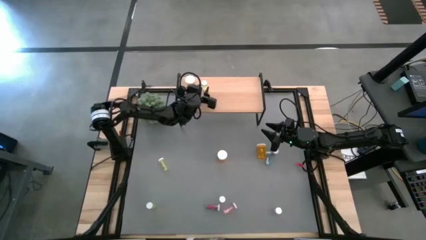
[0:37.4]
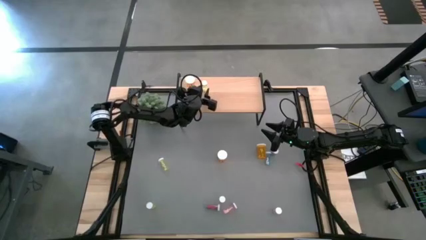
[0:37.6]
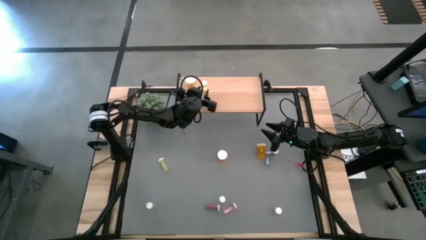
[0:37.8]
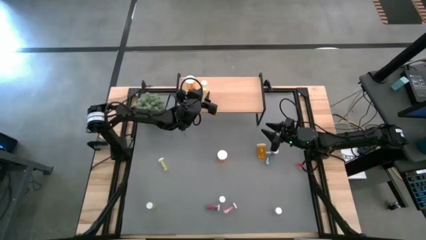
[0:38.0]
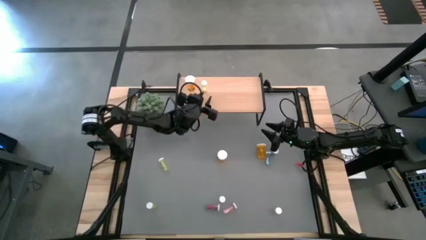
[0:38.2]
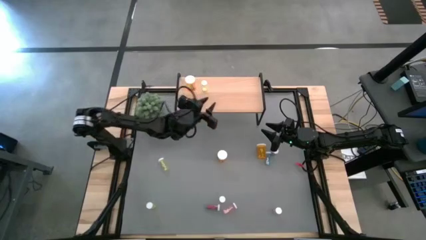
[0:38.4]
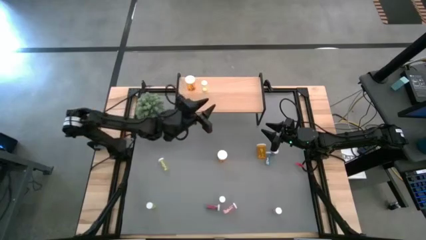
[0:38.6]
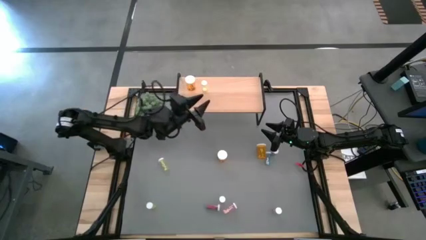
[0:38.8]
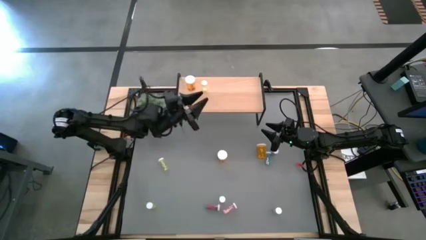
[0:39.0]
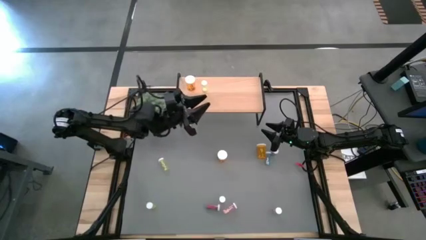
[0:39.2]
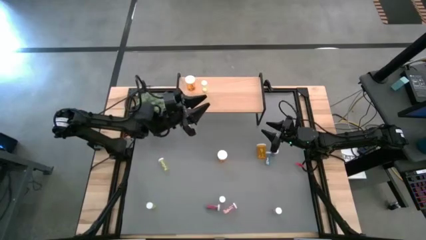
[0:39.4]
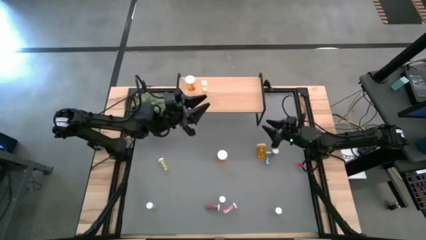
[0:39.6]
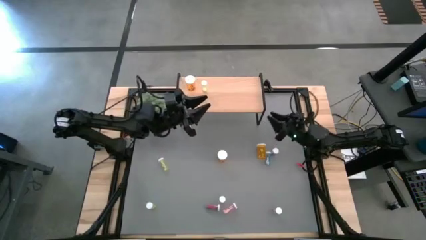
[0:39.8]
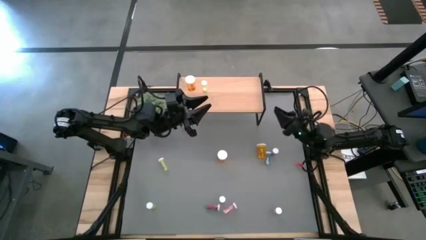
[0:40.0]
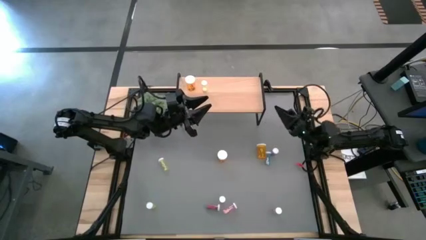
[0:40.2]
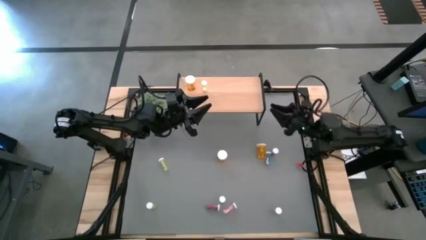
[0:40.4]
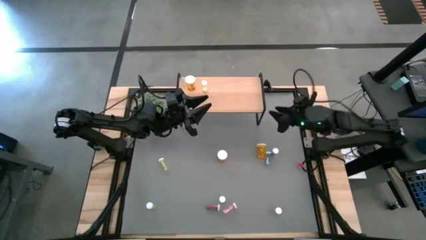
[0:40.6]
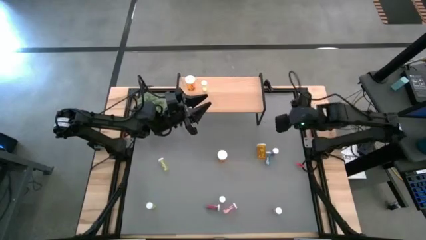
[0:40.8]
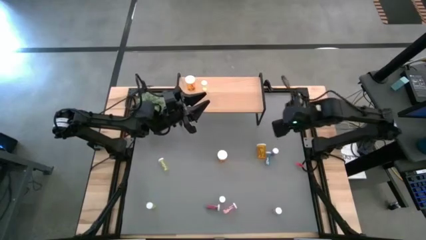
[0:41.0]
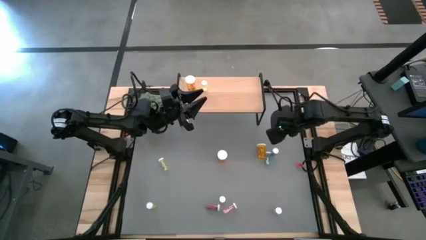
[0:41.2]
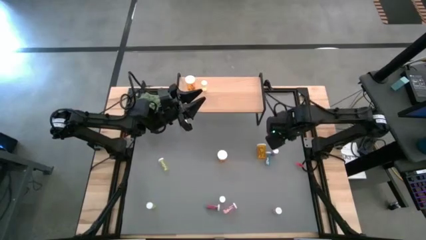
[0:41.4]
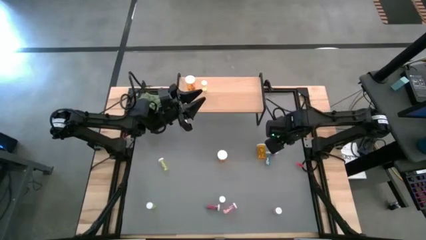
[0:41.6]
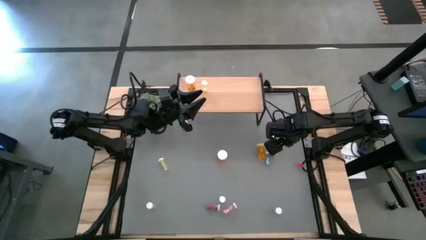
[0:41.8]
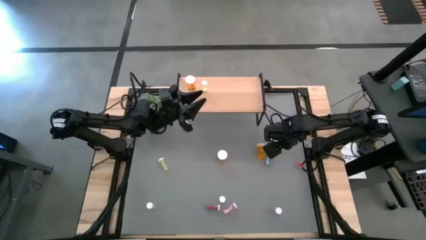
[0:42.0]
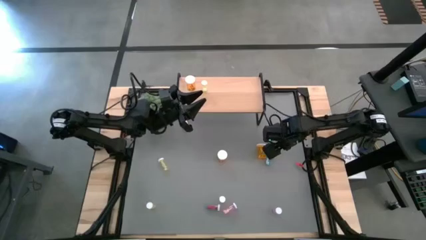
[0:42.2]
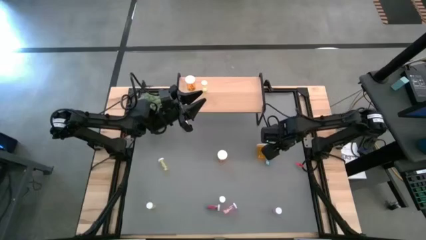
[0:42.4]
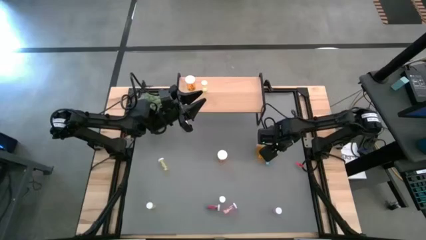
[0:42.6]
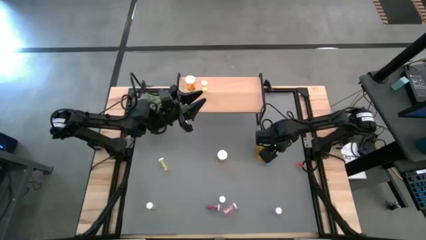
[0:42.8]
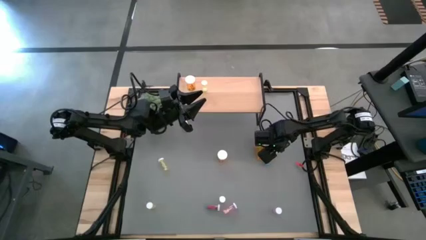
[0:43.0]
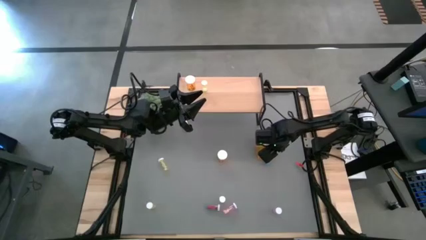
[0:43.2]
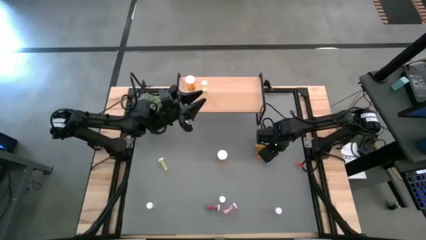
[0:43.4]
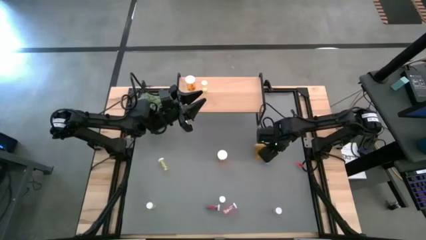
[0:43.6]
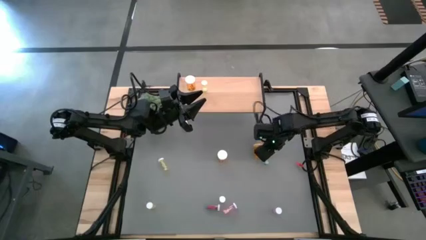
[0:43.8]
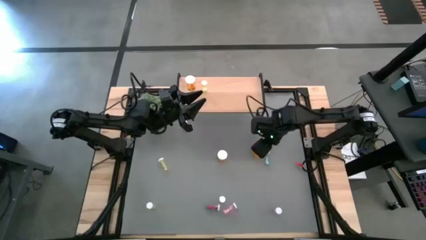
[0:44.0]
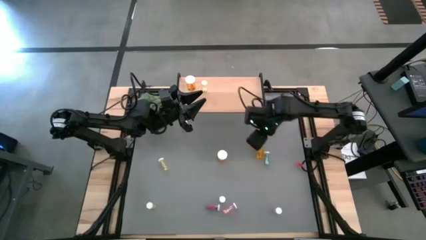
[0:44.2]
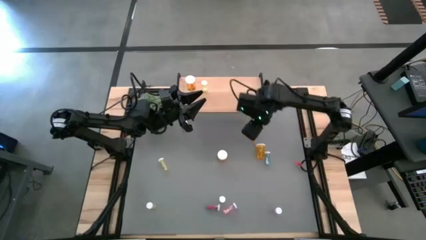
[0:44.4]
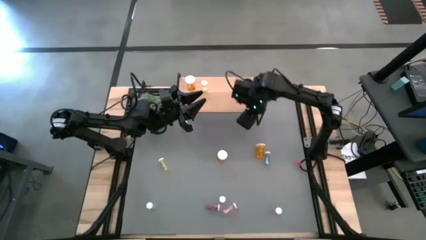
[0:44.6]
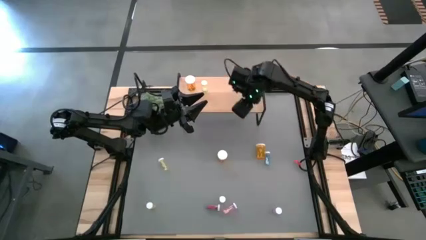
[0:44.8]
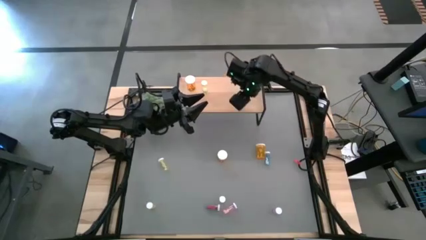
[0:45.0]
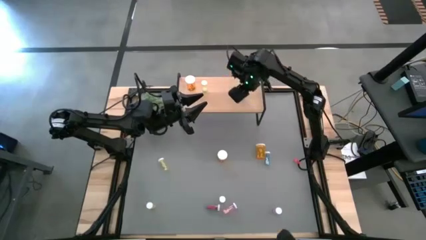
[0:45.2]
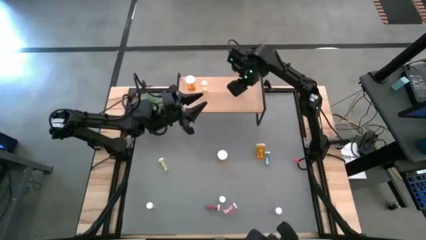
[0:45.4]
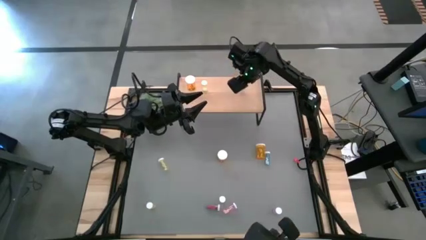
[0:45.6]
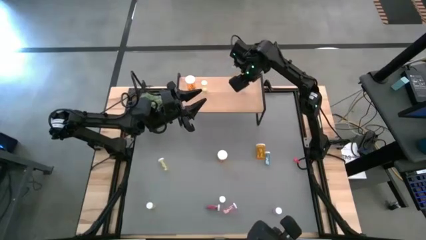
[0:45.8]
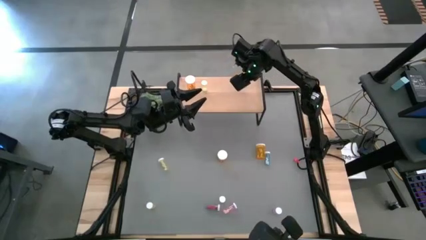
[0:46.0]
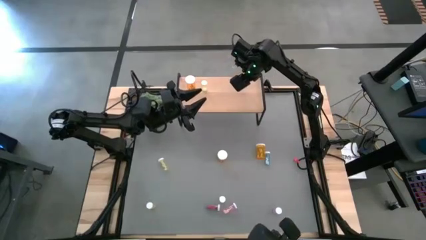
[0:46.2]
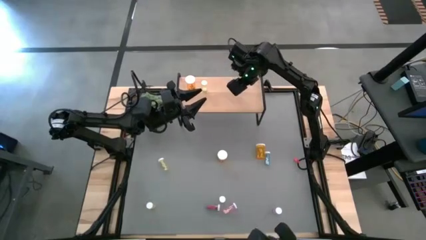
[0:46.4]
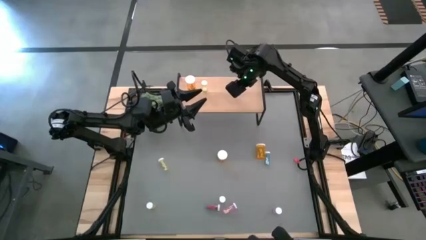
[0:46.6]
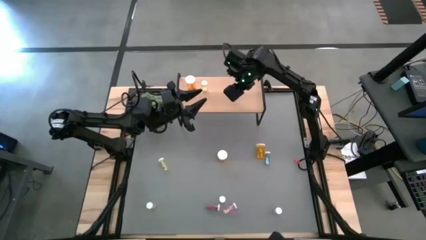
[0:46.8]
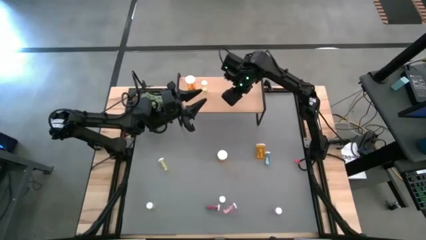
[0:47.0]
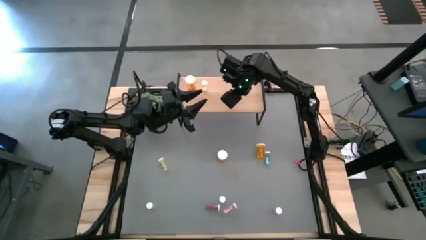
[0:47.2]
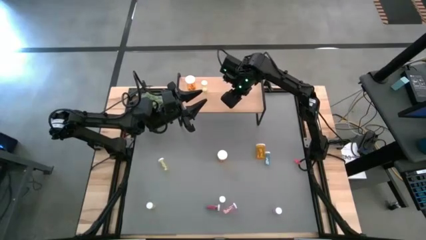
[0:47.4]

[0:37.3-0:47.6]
Task: Pick and place medicine bottles onto shelf by color
Put the right blue pill bottle to the right of the yellow pill bottle on the shelf

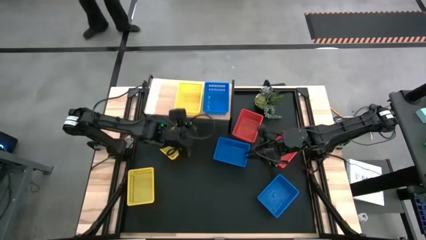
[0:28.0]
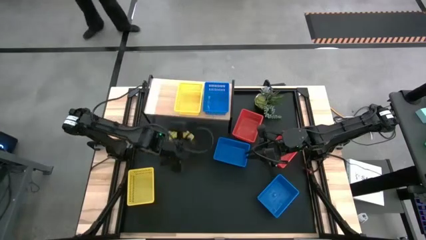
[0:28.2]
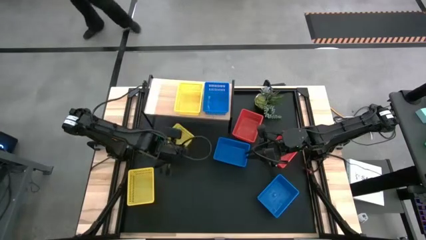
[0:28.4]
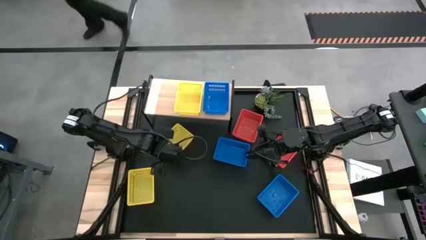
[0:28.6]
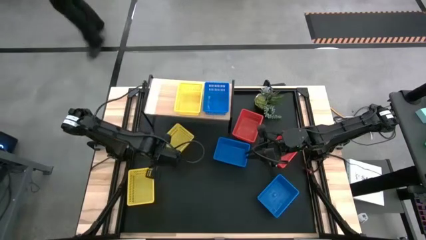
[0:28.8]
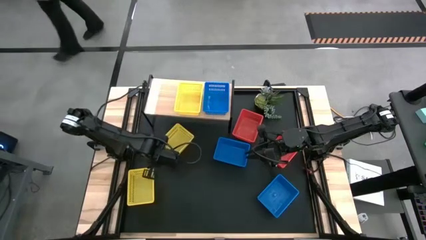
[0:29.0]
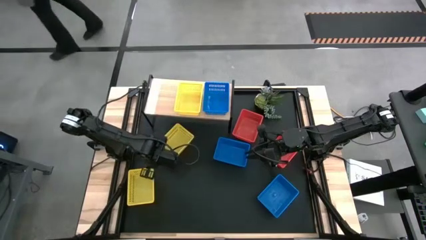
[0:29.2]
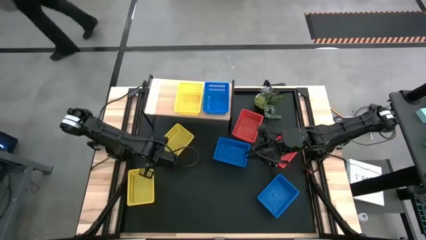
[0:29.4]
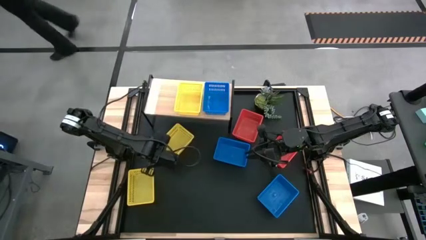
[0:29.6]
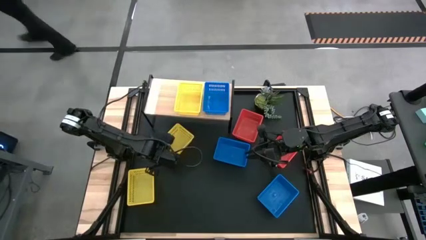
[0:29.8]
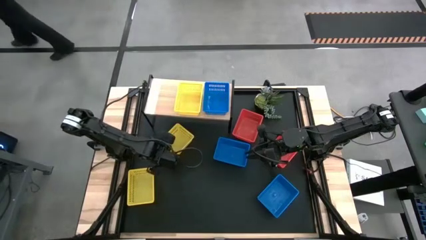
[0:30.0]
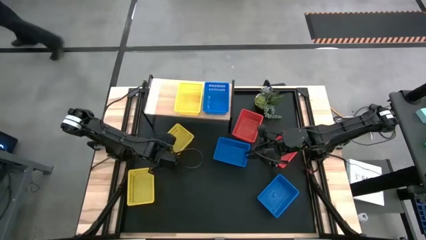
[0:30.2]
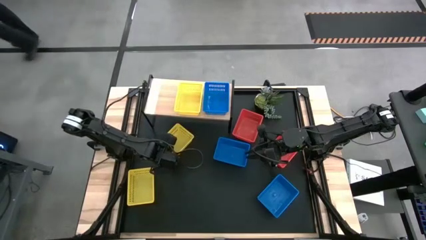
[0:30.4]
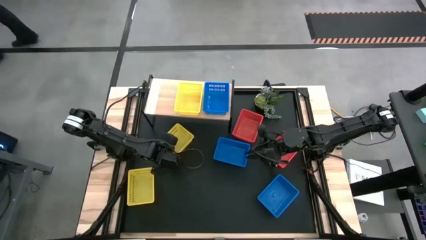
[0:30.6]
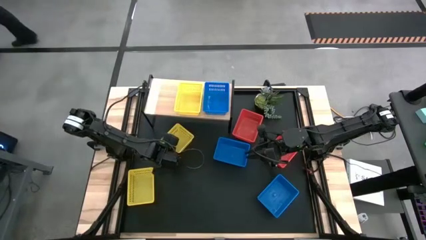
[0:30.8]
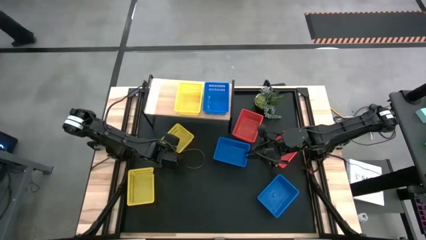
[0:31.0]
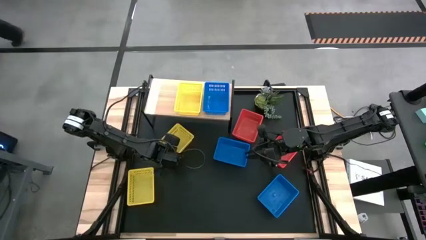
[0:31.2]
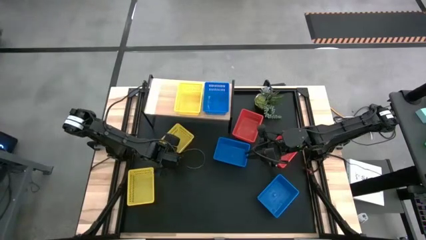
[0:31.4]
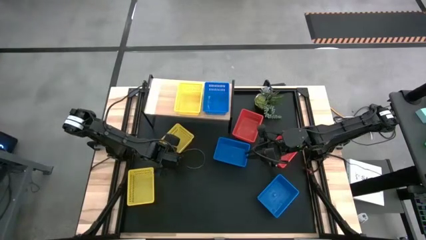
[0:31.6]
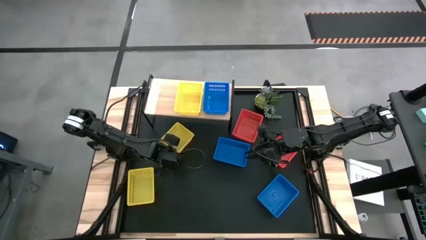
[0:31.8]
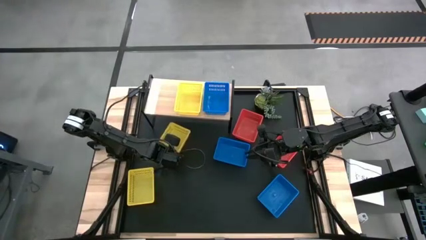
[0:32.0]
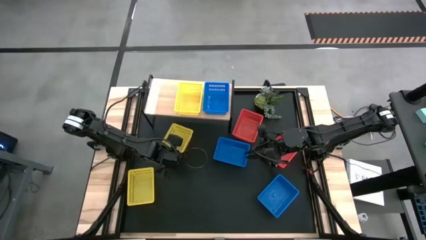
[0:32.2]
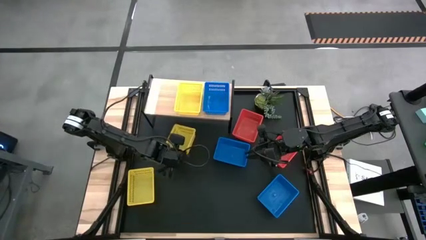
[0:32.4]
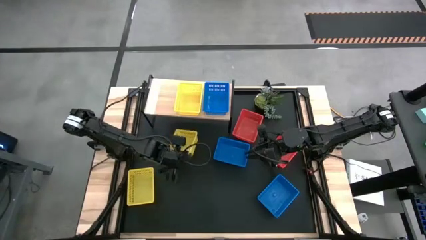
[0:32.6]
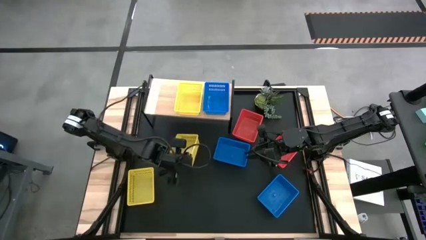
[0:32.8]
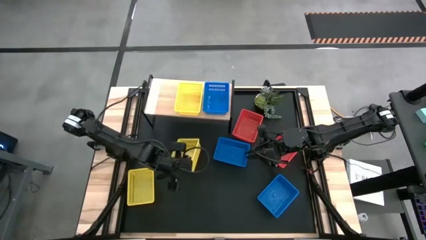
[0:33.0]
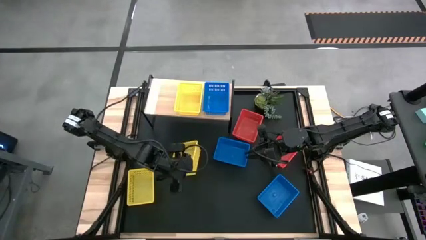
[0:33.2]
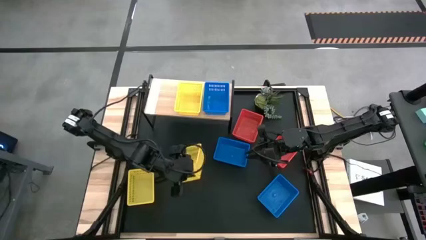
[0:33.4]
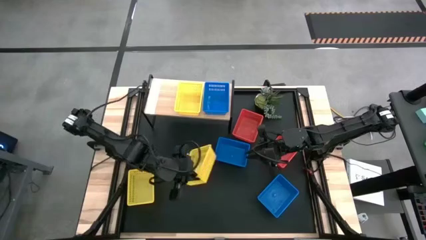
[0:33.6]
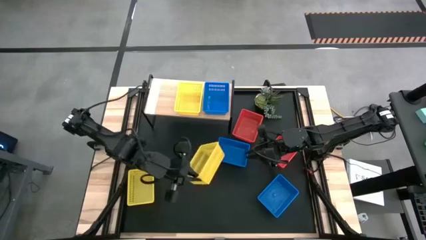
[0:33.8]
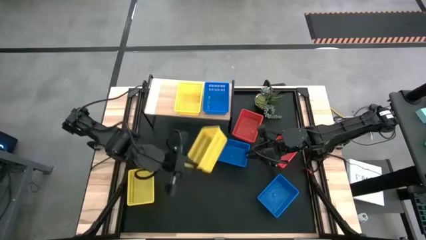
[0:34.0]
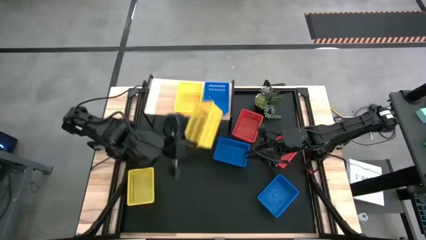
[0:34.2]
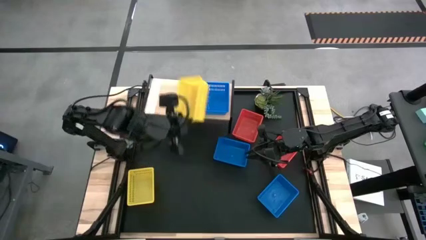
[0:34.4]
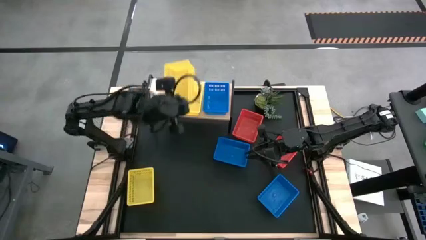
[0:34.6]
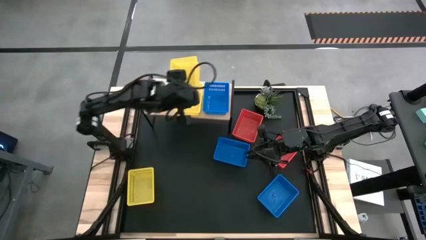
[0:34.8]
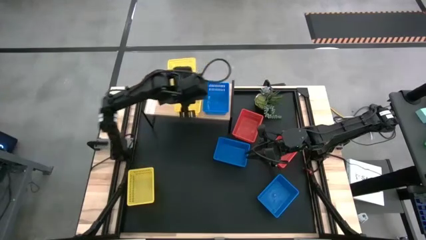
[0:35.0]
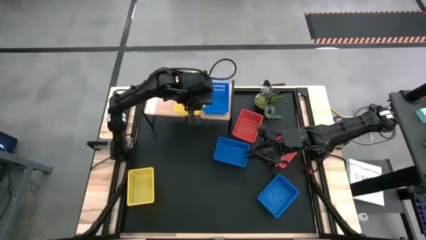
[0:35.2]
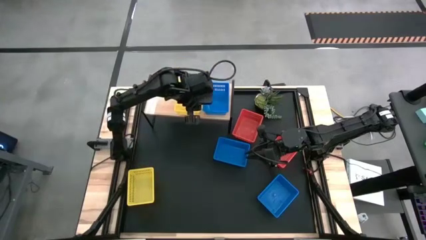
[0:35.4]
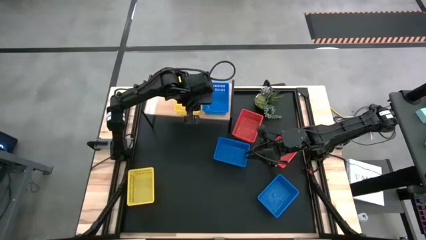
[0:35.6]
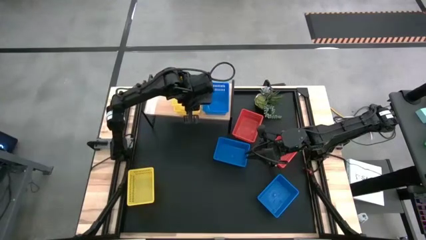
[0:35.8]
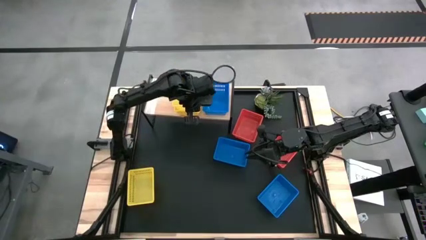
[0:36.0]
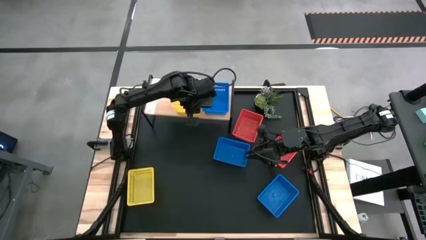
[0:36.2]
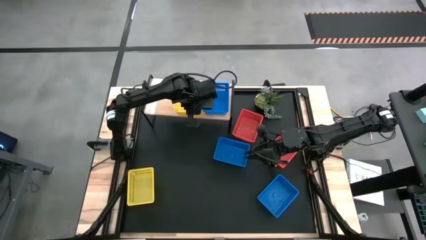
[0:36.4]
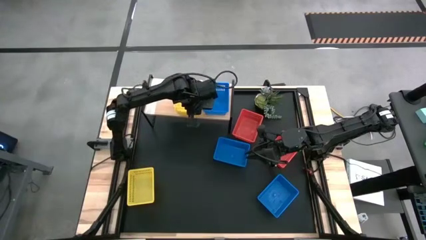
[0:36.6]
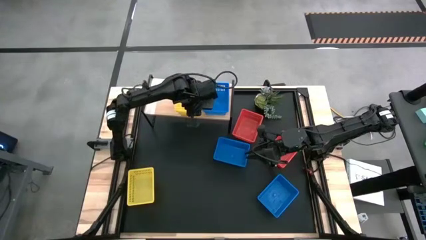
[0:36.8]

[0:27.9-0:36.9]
Task: Stack baskets on shelf by color
Stack the top yellow bin on top of the yellow bin on the shelf
